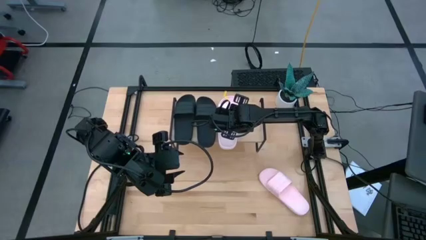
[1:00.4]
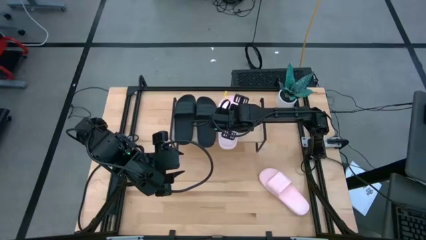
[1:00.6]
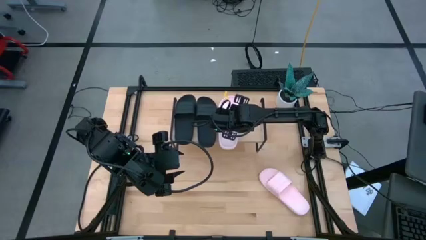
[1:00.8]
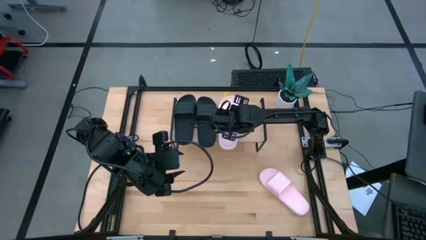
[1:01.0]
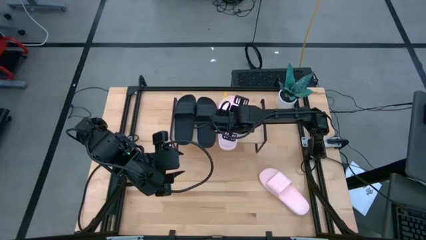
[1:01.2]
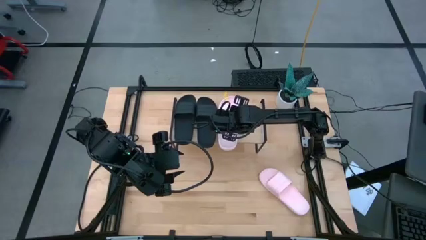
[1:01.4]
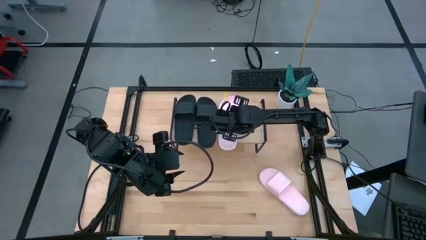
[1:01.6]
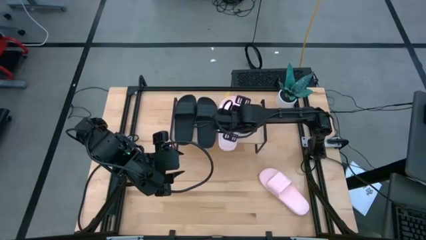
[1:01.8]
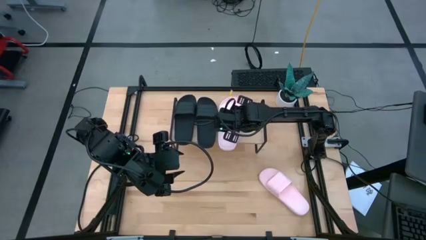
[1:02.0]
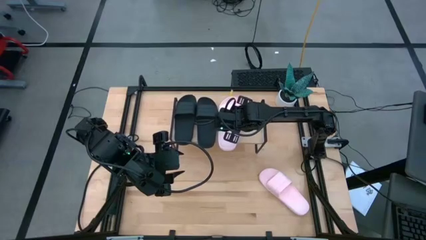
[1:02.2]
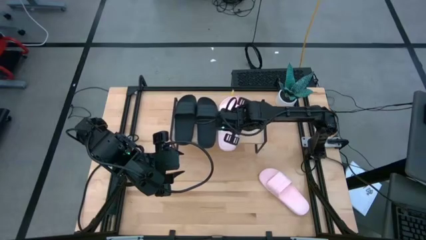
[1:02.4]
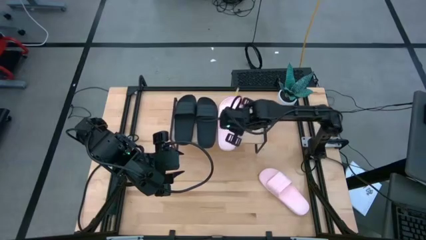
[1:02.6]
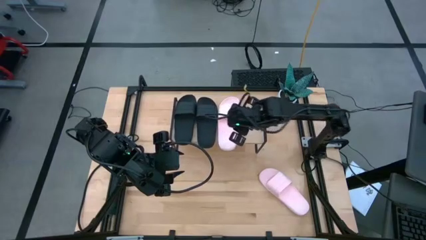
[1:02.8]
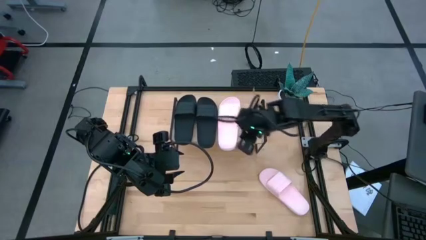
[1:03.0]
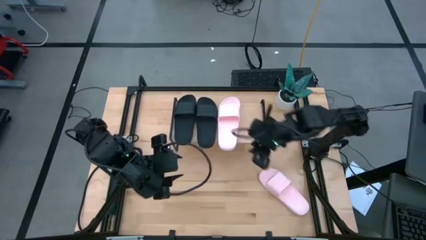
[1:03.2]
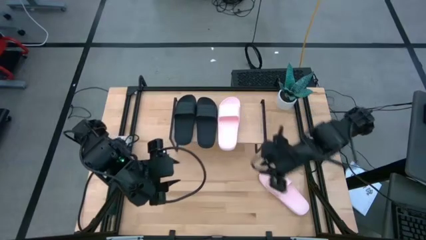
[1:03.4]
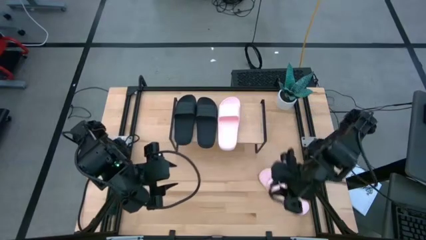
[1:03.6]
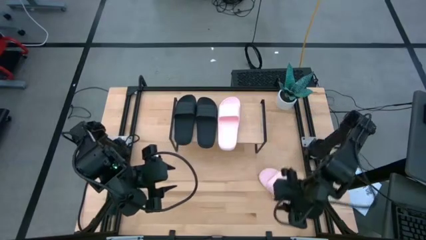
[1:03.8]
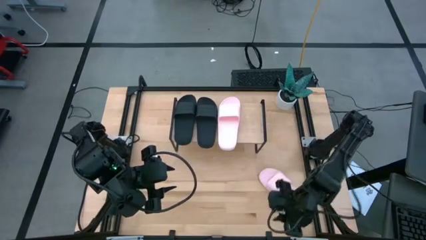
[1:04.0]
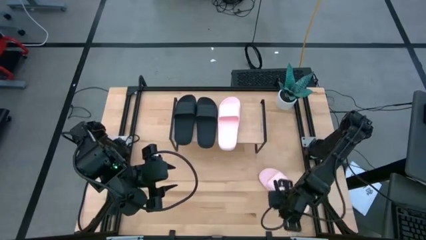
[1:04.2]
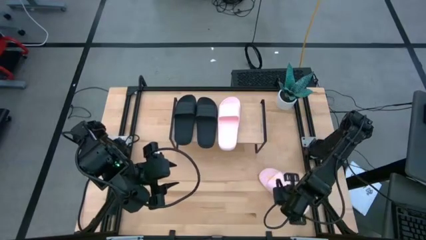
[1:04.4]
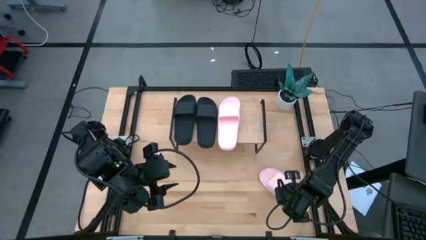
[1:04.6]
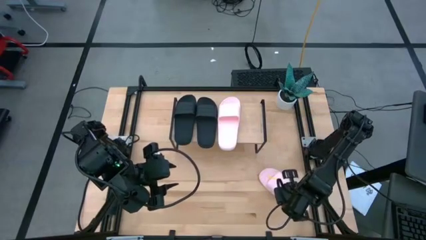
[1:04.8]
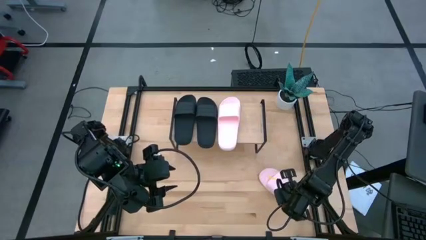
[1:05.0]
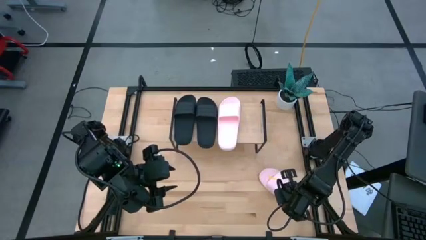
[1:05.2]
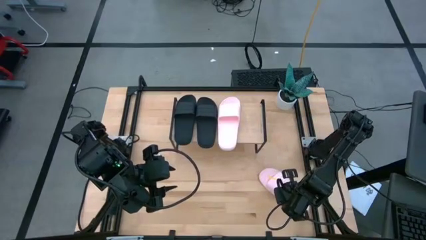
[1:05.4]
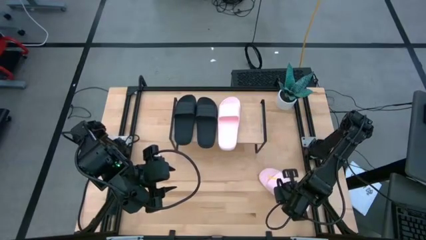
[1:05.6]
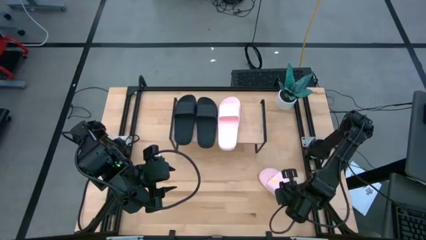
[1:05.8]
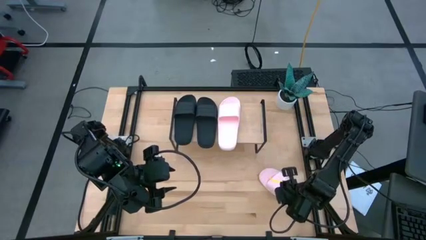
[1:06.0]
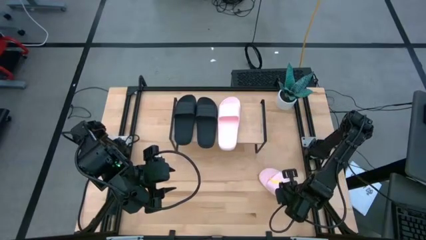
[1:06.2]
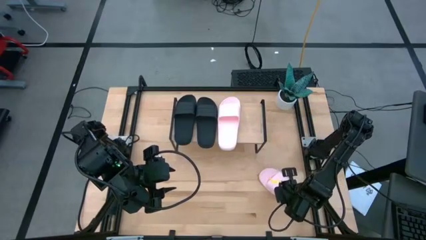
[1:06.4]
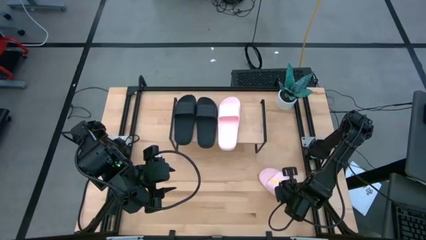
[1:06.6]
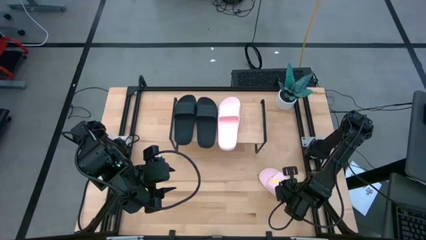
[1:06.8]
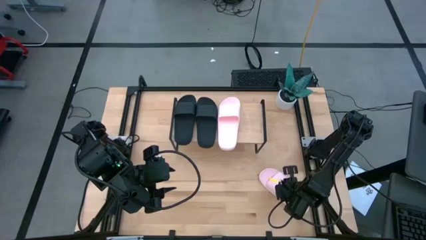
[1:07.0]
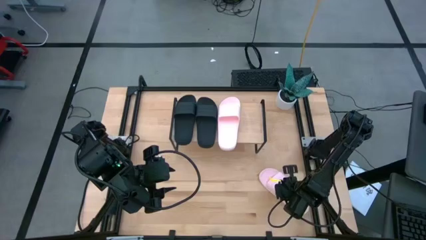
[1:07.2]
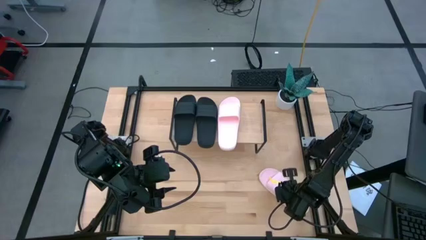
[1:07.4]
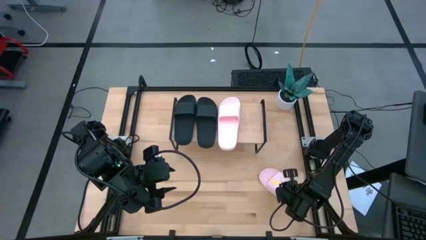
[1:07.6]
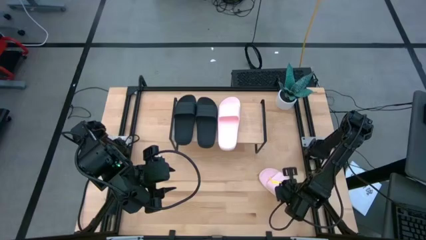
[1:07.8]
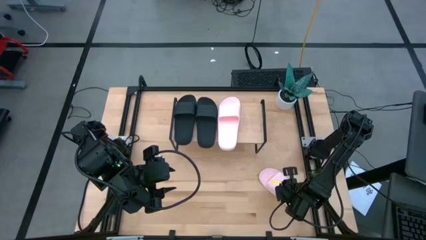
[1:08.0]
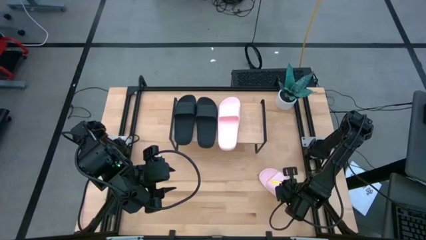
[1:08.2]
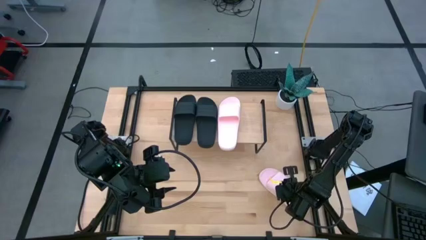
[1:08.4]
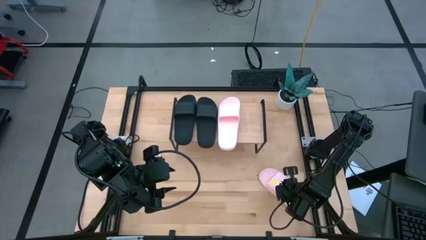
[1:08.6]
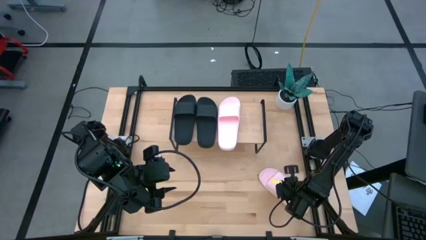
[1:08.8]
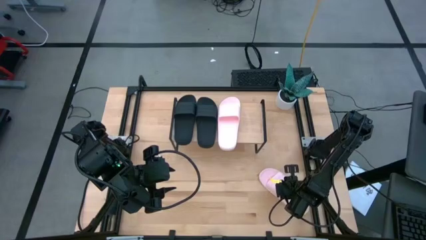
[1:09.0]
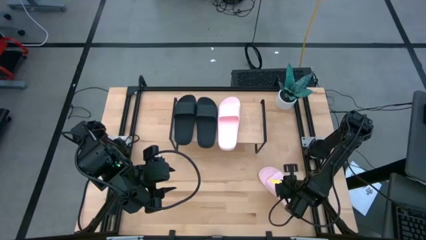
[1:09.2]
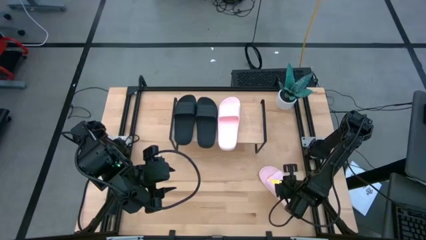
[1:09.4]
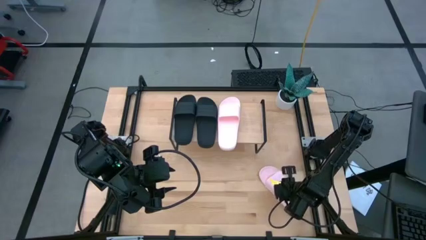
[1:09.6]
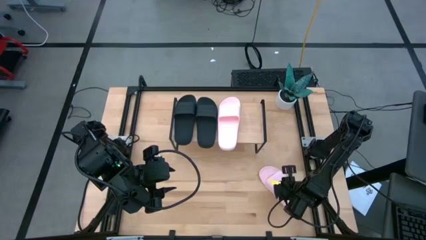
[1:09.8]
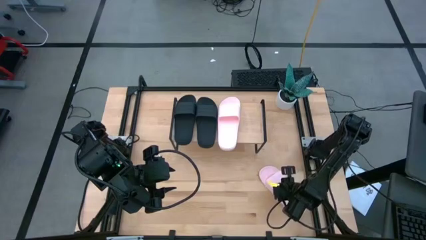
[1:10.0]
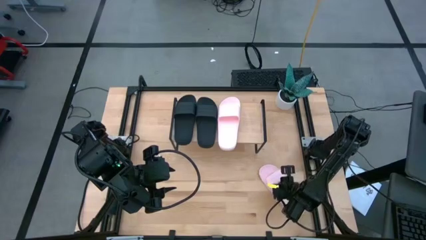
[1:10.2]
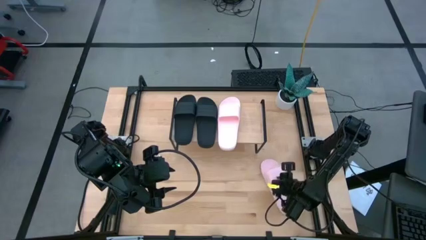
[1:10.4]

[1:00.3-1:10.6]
Task: Pick and place slides into the shelf
Put the pink slide next to the pink slide on the shelf

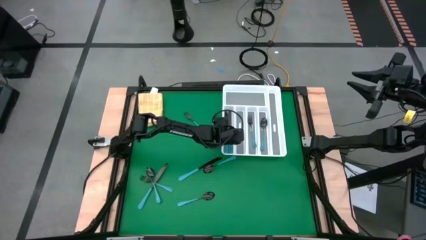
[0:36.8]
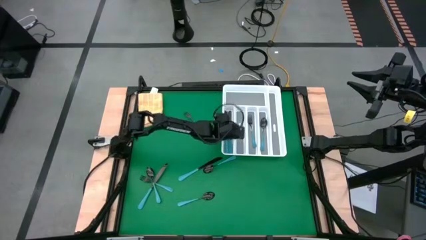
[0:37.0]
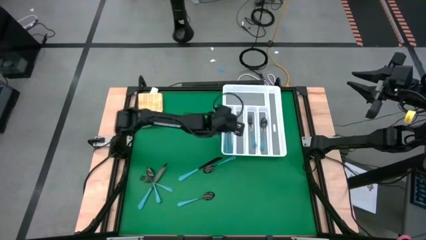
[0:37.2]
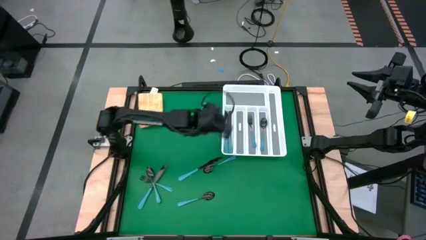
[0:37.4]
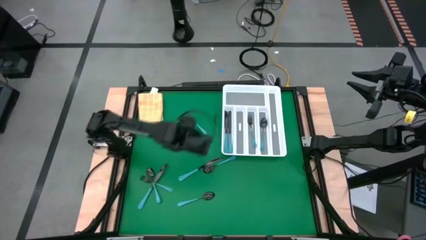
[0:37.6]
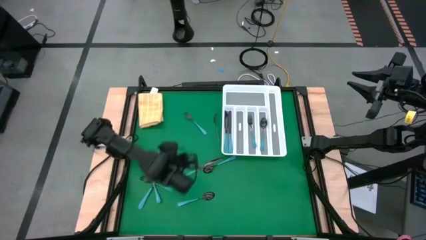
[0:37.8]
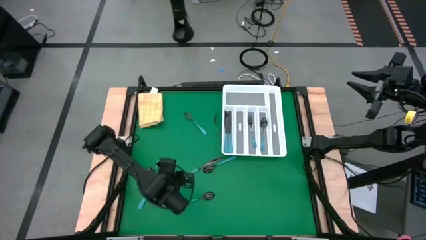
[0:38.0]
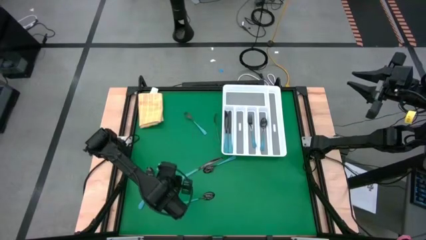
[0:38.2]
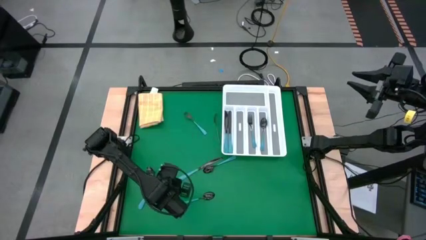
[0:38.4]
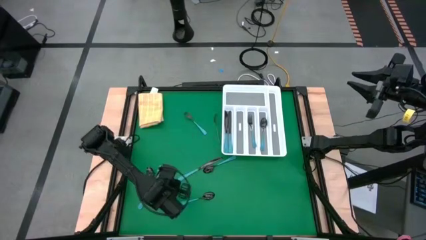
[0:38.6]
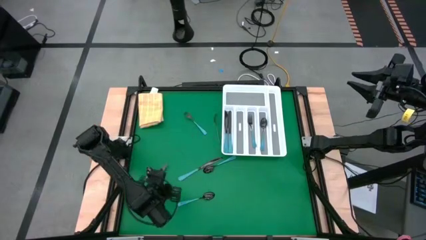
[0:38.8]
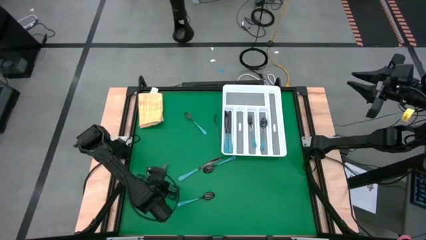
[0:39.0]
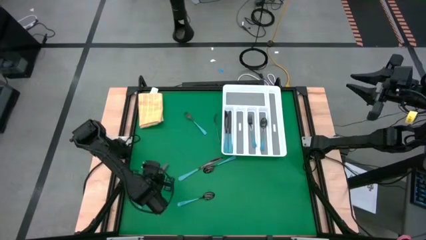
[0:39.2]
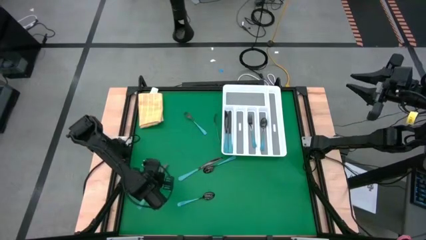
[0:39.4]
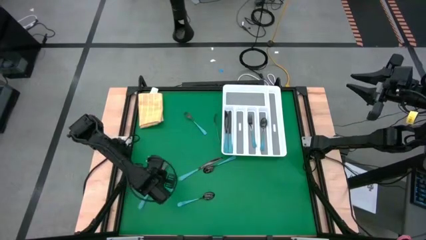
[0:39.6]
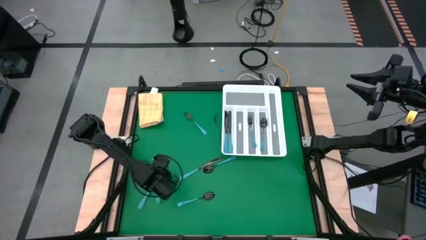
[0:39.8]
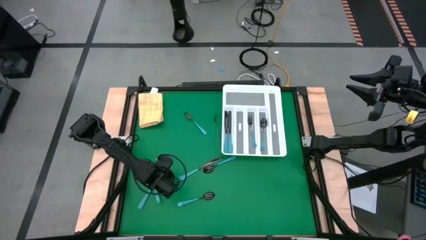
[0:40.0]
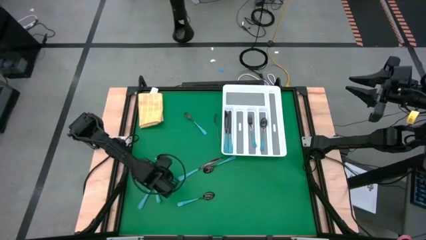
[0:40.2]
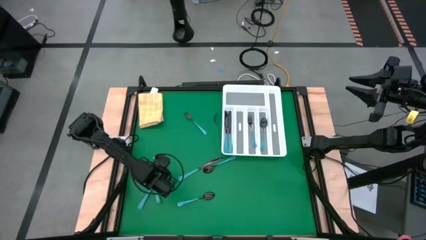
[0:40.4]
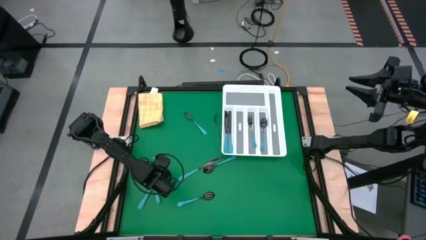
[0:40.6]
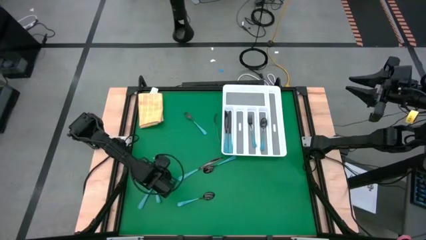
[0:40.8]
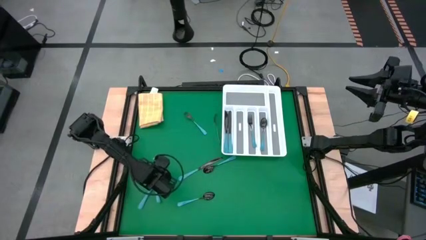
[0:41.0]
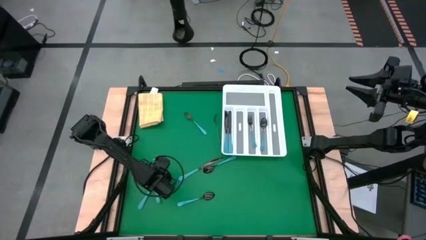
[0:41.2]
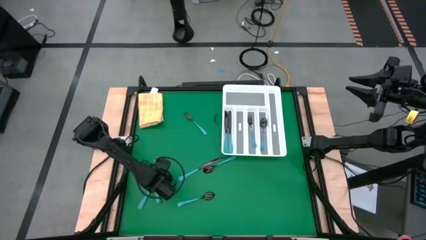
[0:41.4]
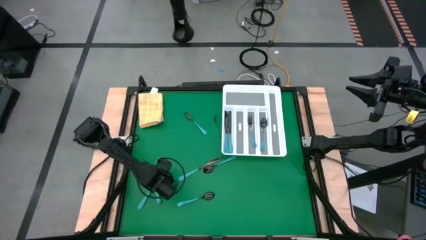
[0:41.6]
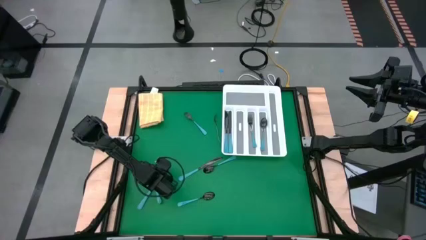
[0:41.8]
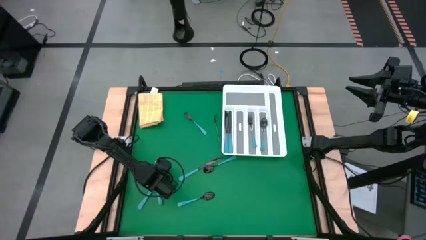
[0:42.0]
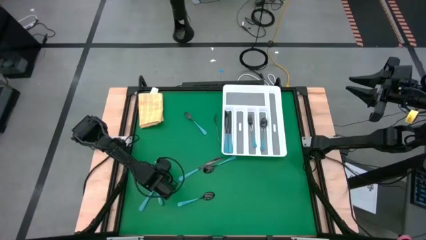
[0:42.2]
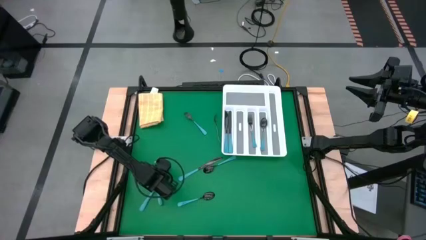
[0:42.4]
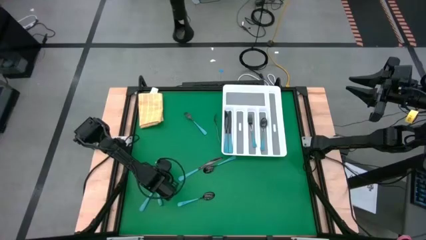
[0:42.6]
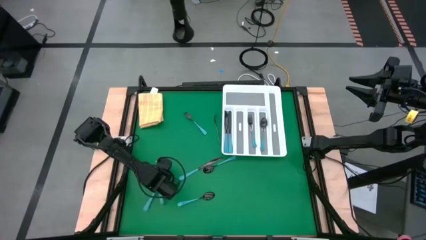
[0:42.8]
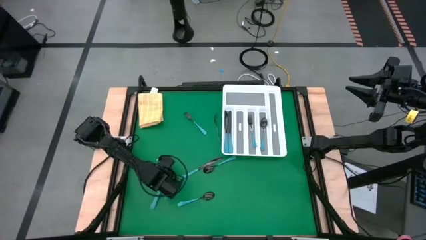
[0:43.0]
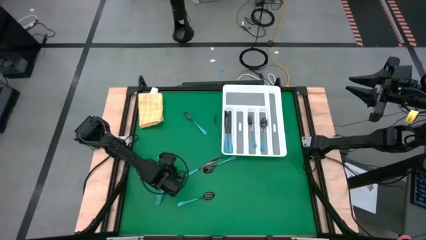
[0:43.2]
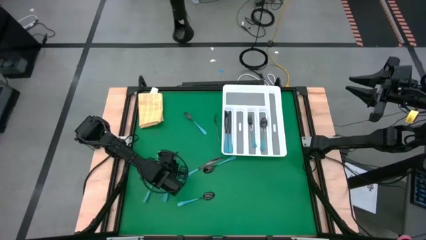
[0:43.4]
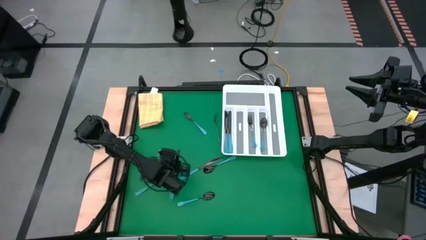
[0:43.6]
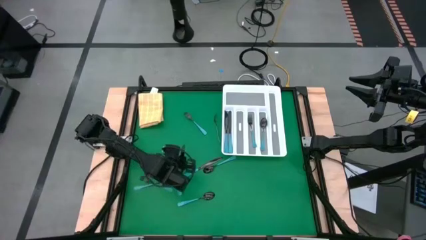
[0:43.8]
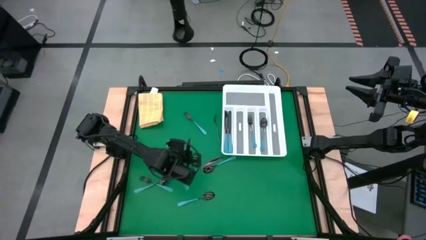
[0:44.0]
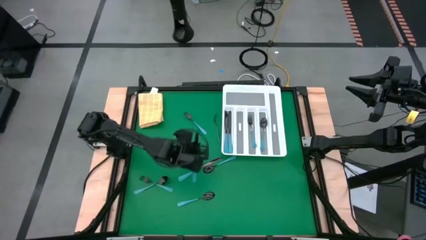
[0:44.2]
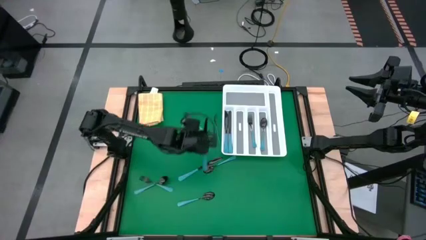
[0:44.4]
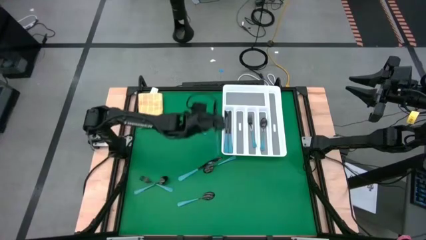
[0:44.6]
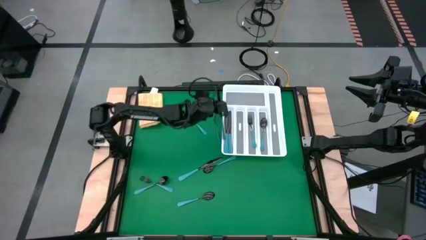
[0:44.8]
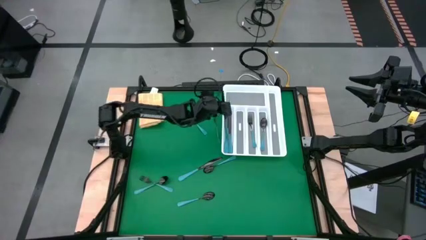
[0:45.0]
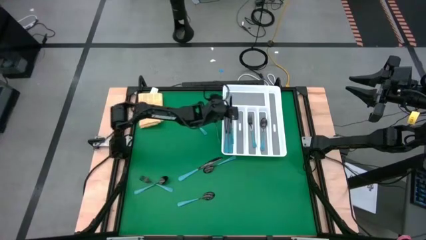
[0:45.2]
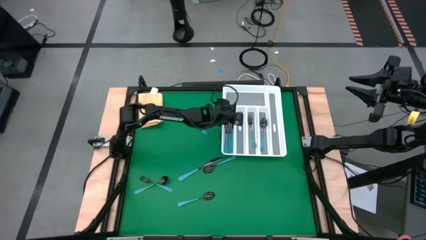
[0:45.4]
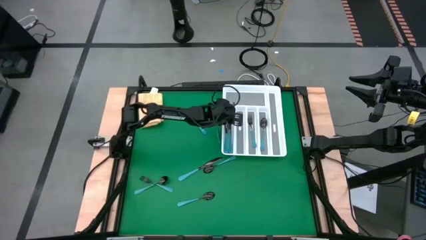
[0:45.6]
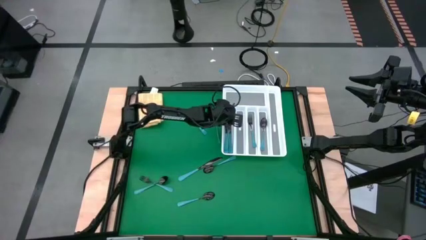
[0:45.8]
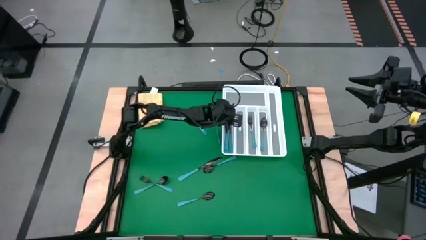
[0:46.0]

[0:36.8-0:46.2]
Task: Sort silverware
Put the blue knife into the white cutlery tray
